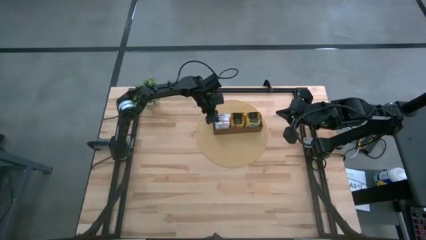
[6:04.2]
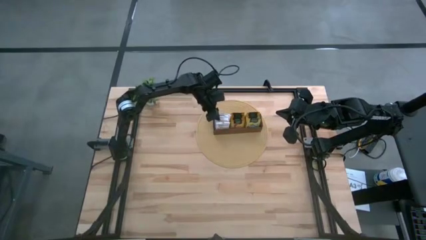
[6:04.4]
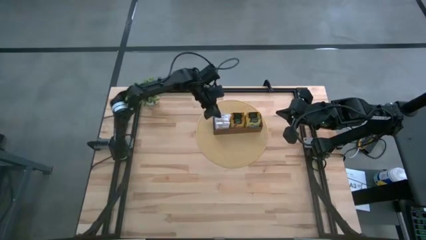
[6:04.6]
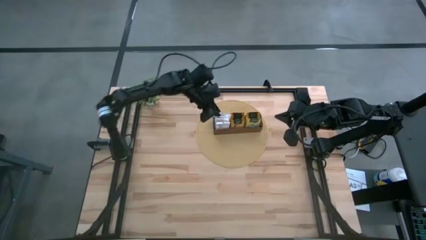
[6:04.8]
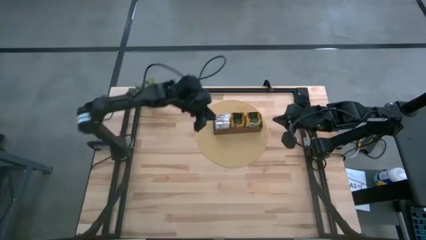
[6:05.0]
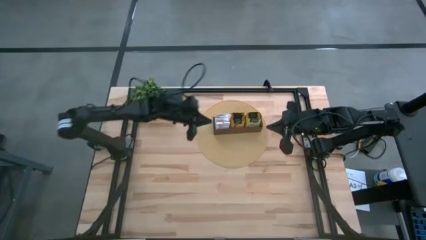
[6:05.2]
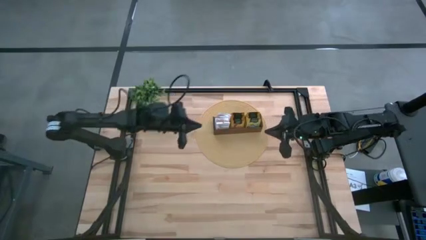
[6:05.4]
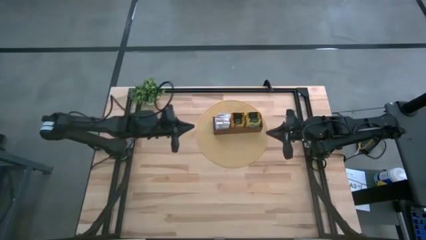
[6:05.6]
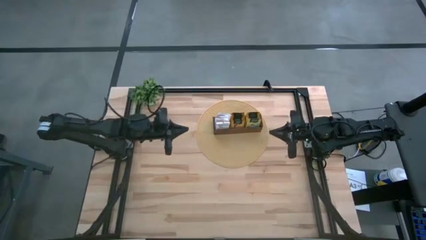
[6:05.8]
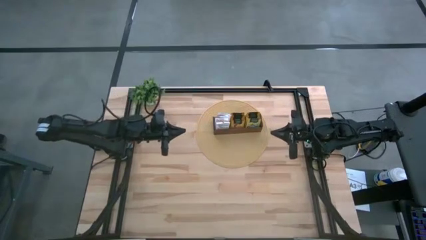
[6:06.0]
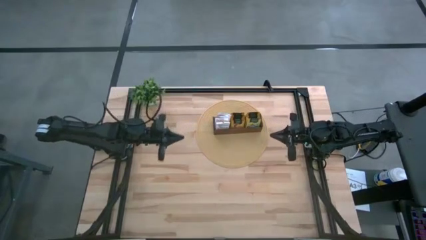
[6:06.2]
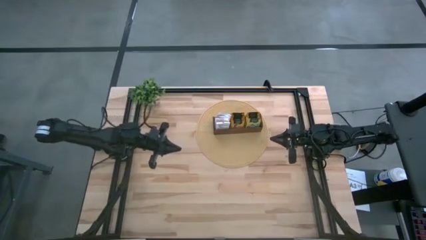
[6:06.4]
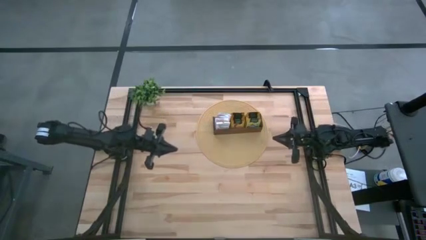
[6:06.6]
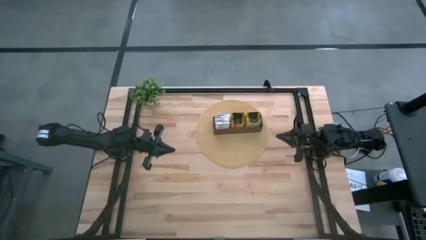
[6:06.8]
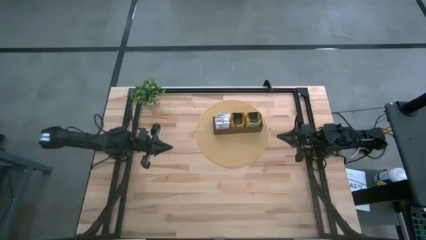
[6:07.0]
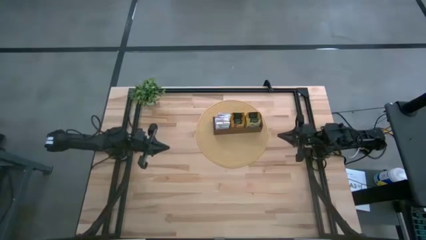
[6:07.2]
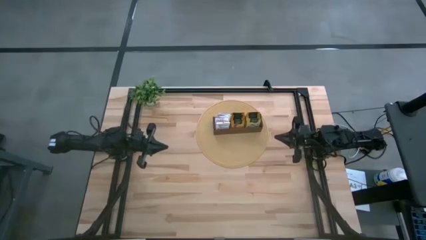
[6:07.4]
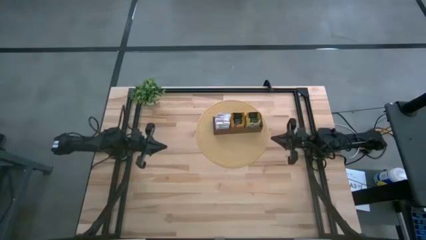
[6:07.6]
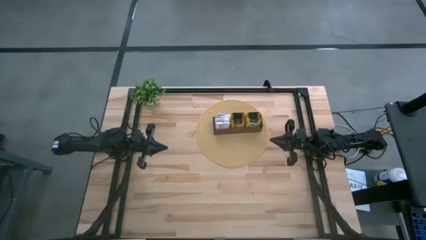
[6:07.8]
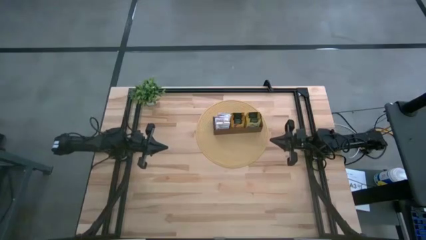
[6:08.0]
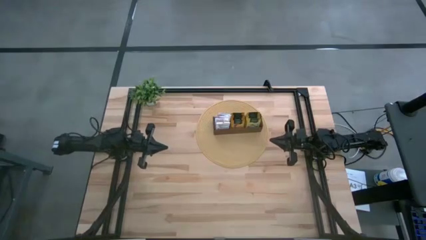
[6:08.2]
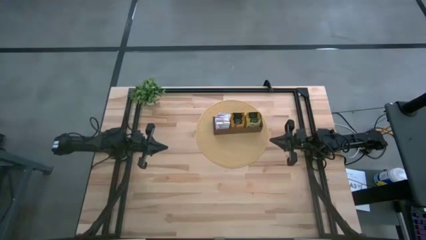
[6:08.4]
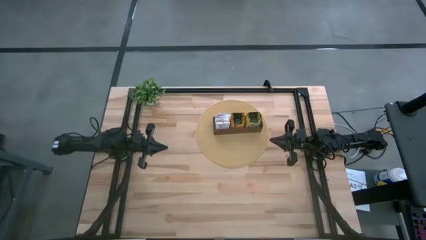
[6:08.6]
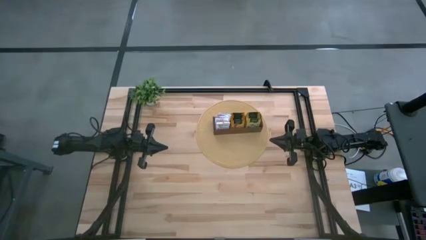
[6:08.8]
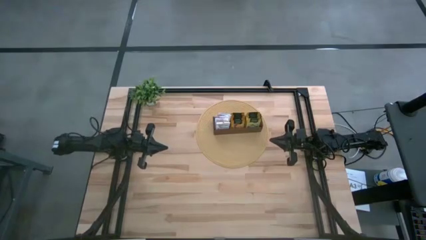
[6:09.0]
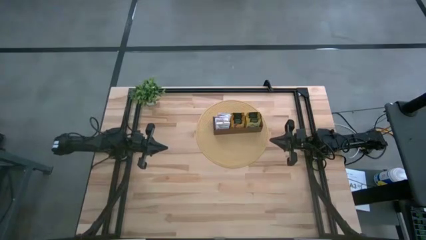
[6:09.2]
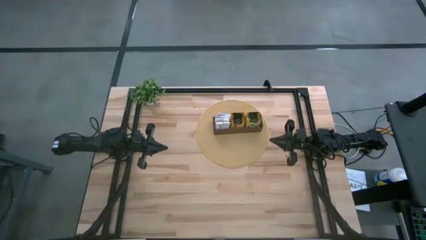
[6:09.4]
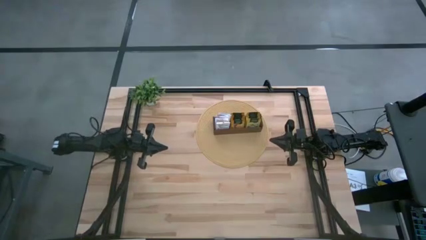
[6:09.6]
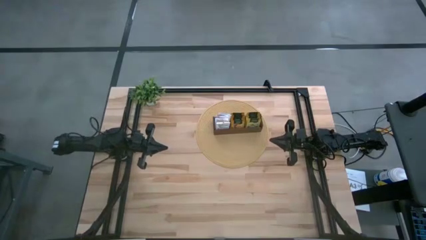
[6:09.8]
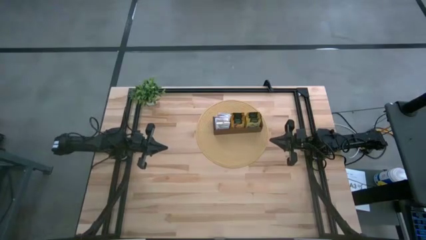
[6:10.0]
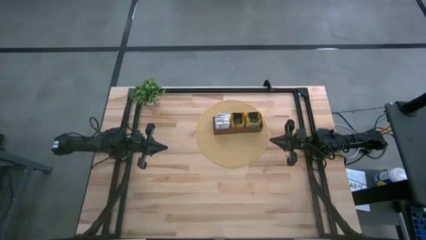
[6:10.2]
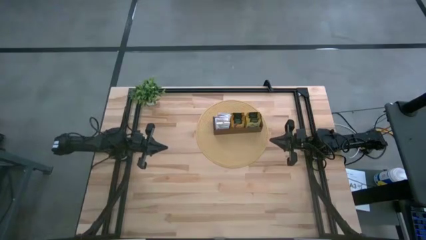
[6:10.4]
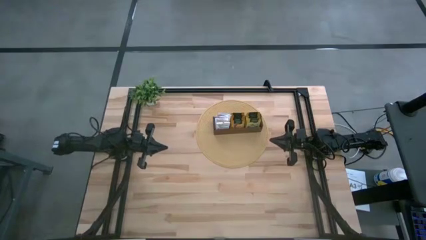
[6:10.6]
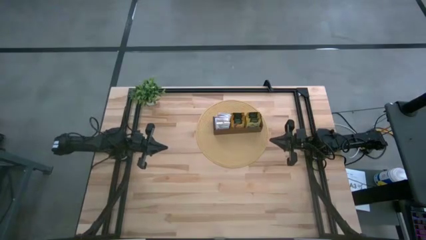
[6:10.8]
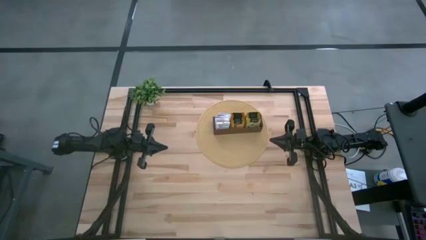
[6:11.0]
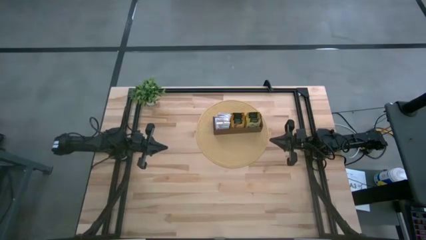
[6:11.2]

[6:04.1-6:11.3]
Task: Pick & Place Tea
Return to Home Position

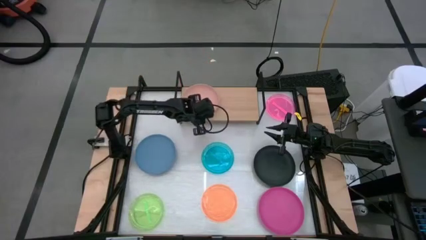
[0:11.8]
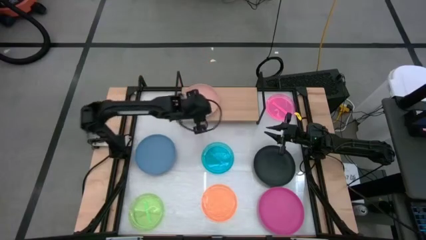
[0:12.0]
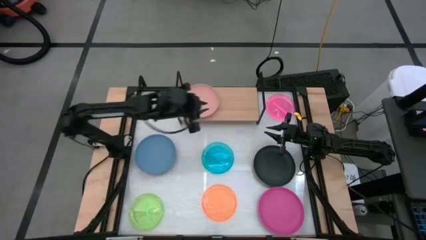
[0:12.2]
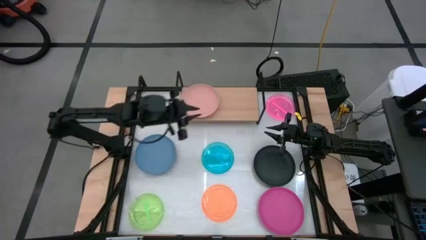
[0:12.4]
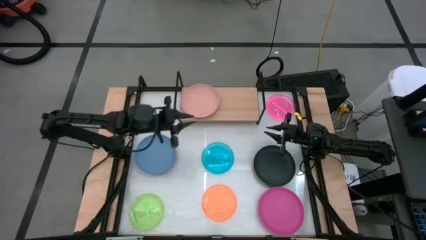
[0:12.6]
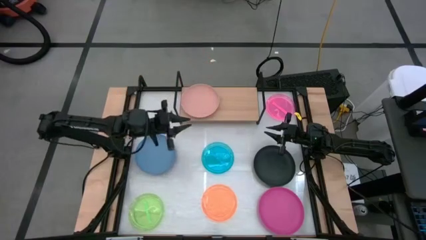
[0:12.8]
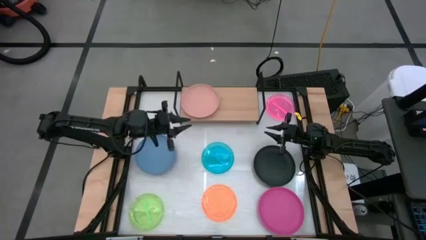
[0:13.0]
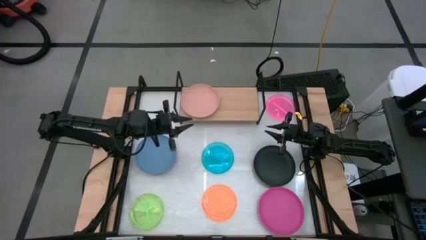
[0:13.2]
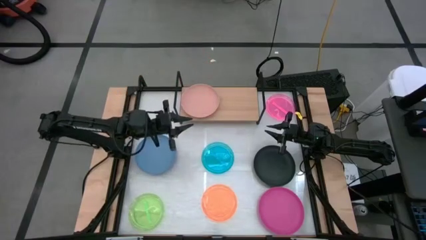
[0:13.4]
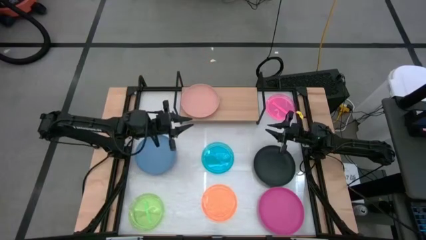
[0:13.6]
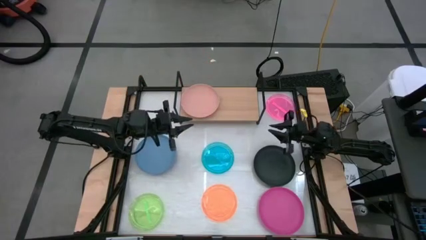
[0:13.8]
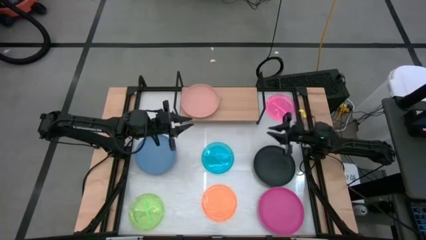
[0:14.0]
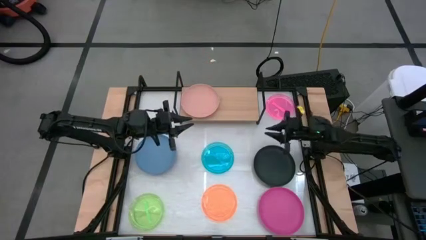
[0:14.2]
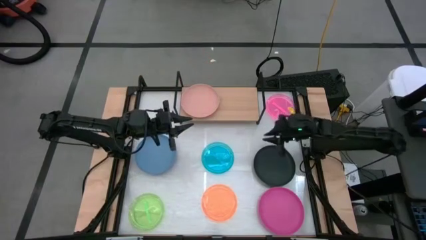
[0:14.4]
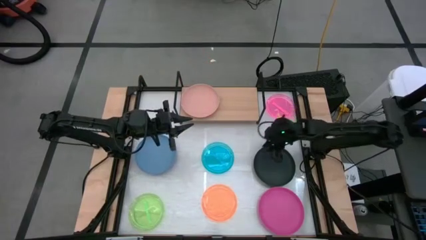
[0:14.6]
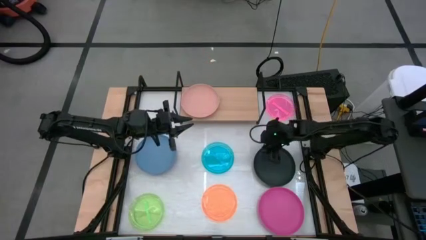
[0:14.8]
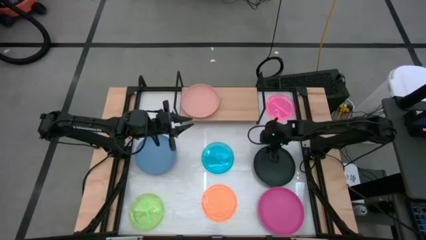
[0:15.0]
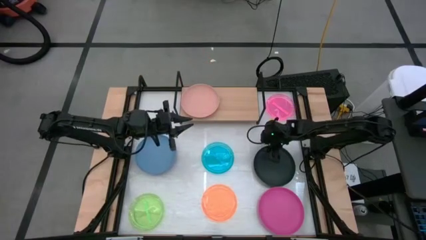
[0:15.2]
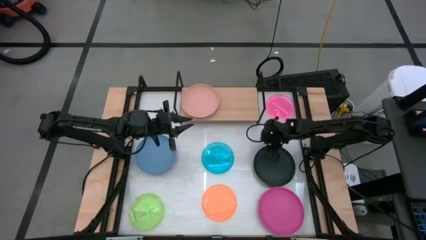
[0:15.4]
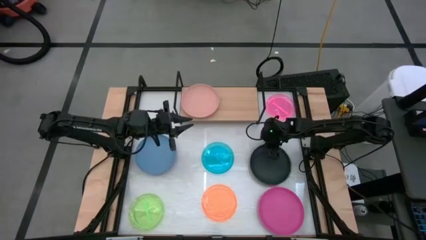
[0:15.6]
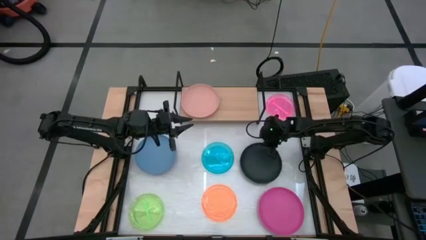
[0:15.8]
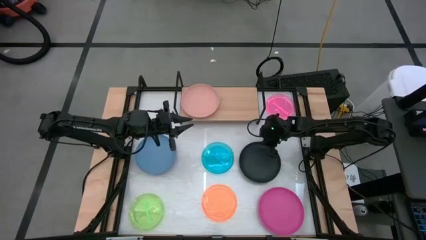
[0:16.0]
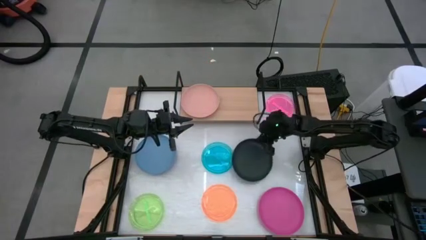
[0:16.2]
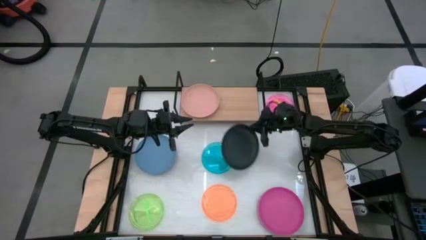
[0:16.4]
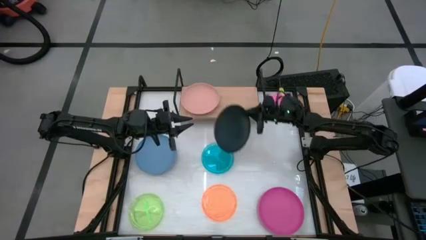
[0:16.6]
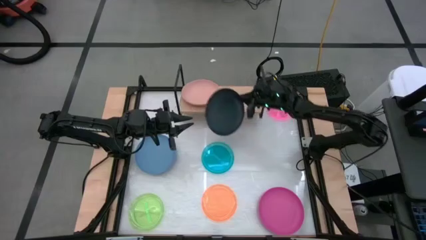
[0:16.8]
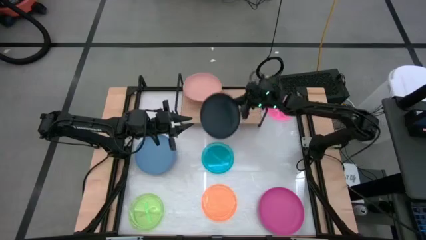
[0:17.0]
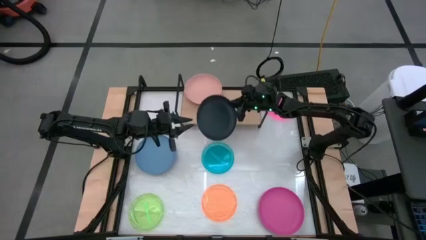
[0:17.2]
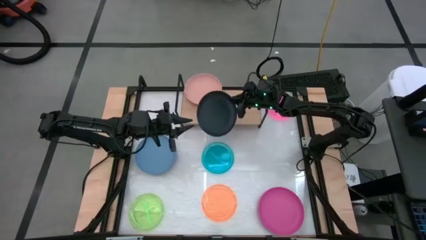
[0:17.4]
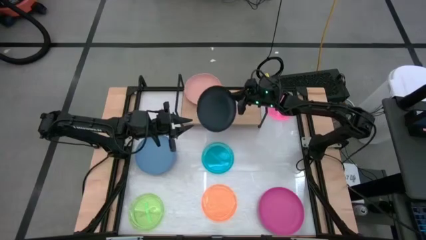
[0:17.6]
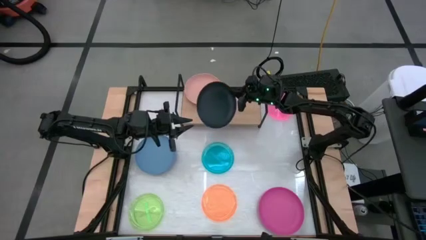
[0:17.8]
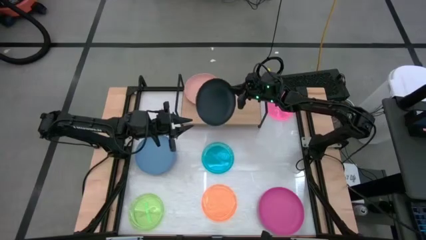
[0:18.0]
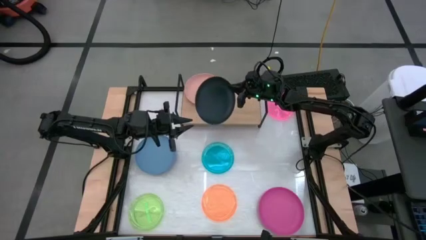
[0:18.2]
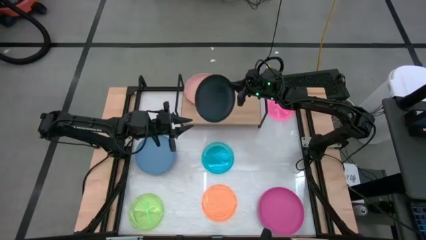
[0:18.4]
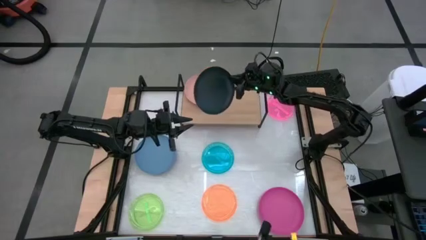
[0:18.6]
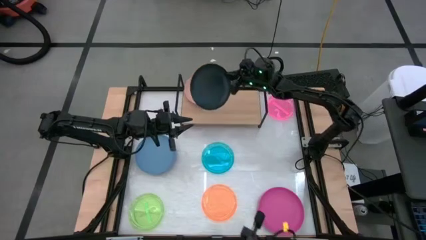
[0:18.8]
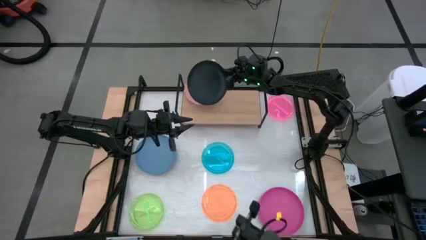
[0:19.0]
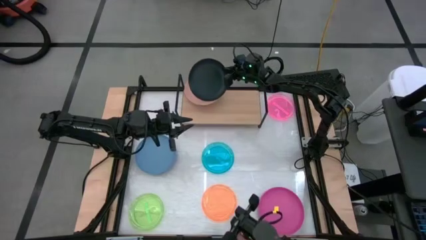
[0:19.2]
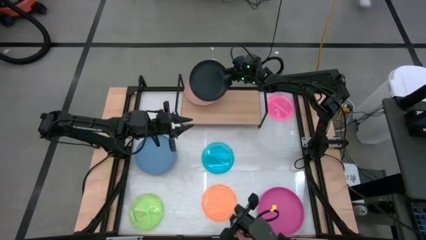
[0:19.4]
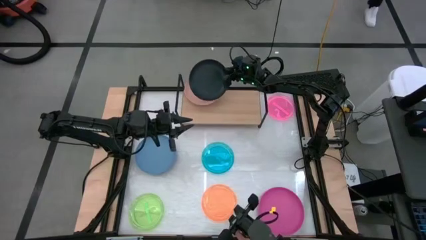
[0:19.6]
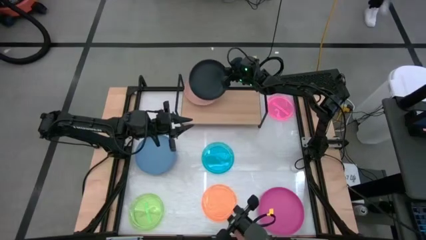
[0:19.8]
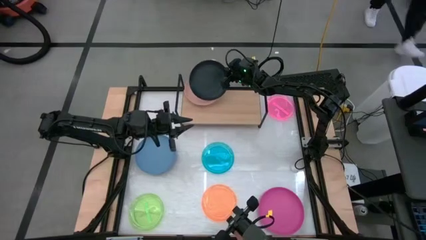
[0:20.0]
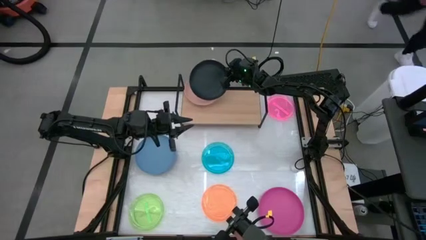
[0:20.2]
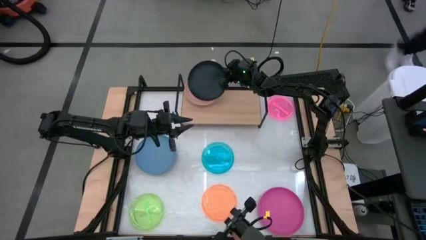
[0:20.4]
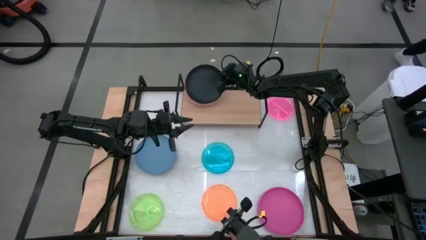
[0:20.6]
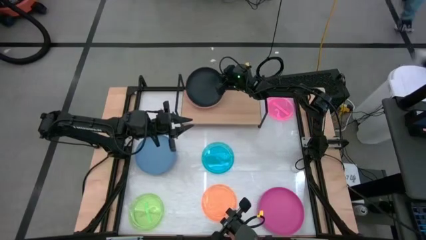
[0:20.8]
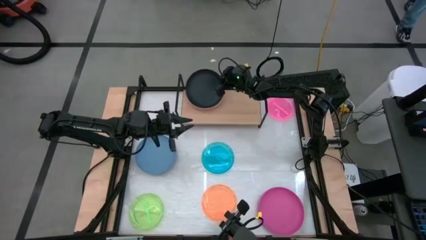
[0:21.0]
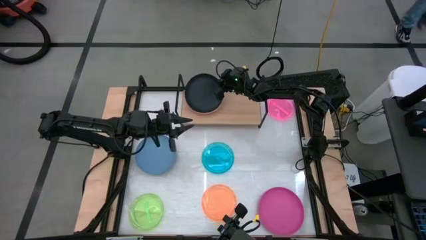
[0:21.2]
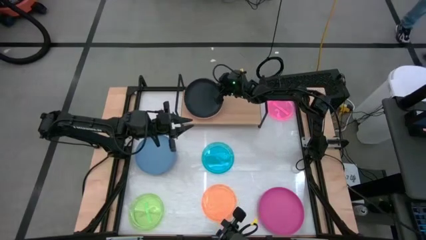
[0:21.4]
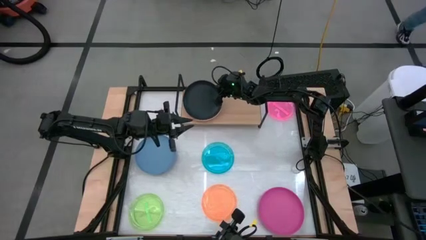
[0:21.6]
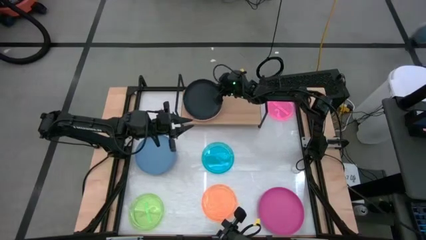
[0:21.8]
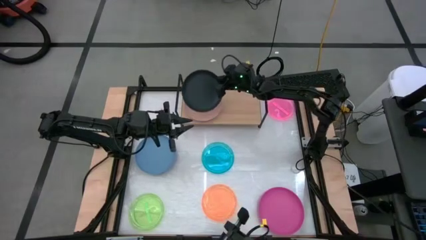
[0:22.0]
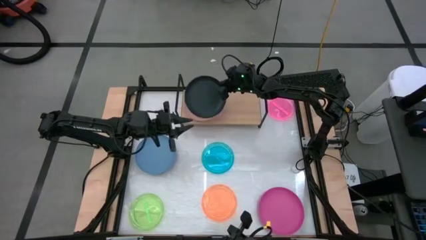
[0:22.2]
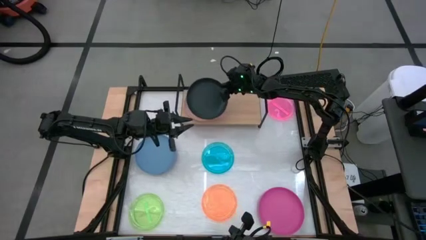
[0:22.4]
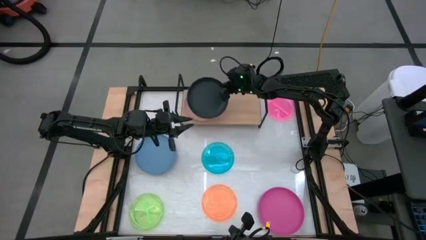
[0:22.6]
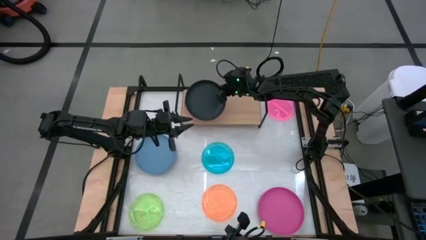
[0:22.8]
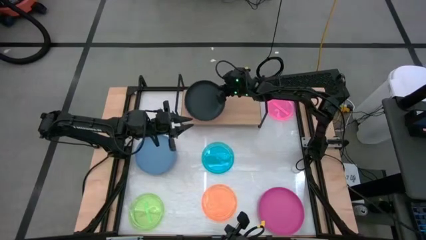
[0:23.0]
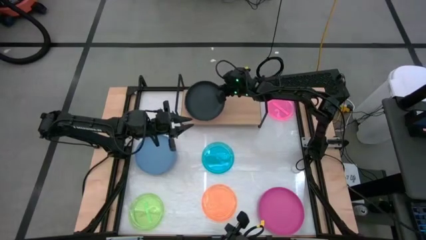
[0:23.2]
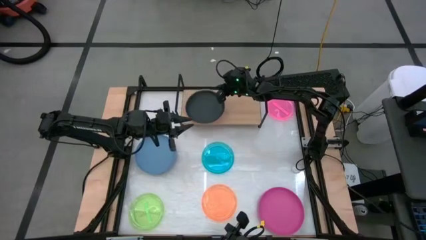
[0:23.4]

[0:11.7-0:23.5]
Task: Place and stack plates onto a shelf
Stack the black plate on top of the light orange plate on the shelf
